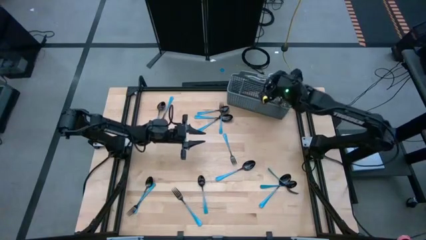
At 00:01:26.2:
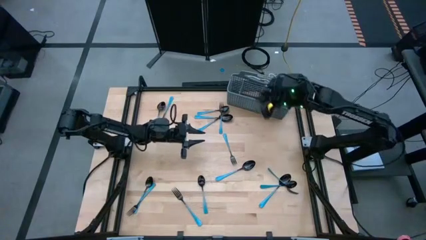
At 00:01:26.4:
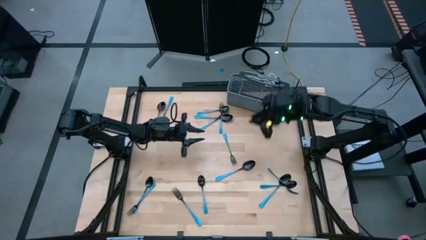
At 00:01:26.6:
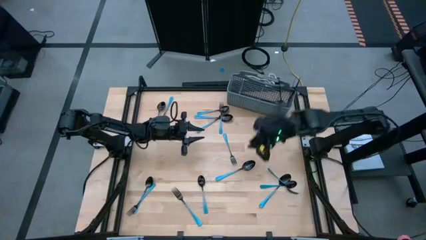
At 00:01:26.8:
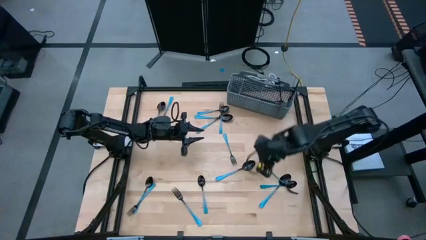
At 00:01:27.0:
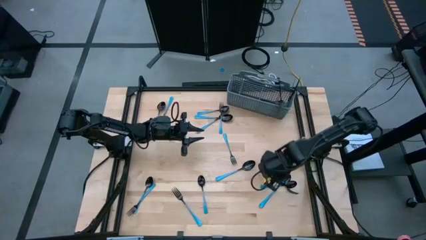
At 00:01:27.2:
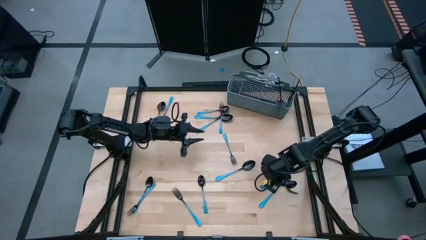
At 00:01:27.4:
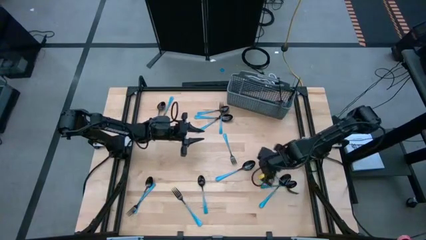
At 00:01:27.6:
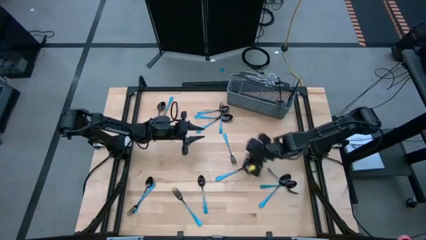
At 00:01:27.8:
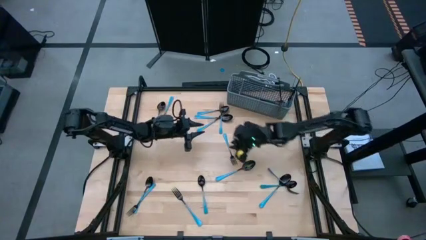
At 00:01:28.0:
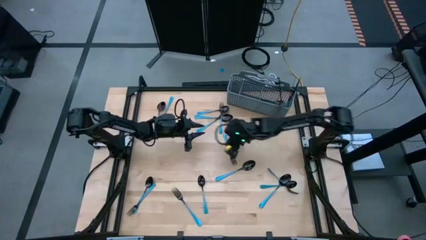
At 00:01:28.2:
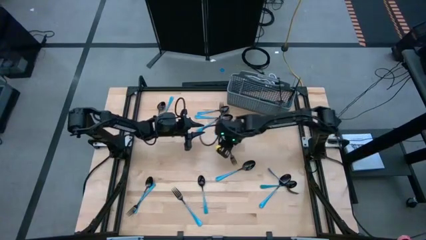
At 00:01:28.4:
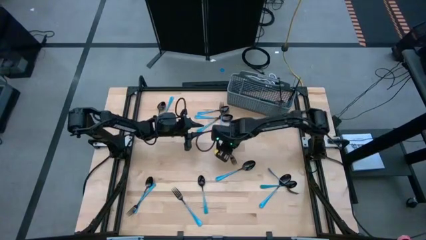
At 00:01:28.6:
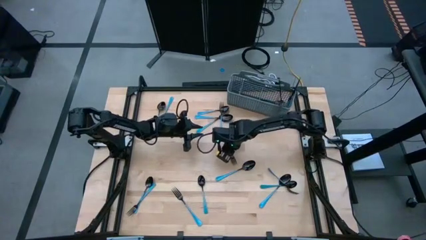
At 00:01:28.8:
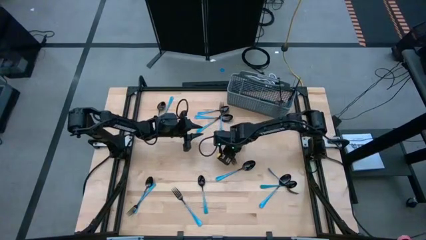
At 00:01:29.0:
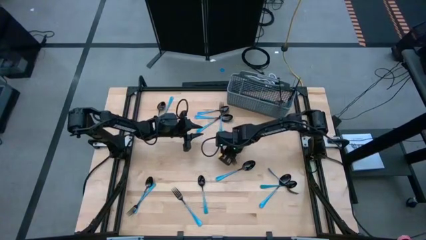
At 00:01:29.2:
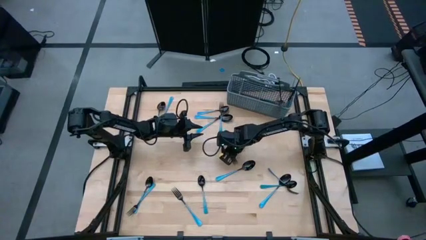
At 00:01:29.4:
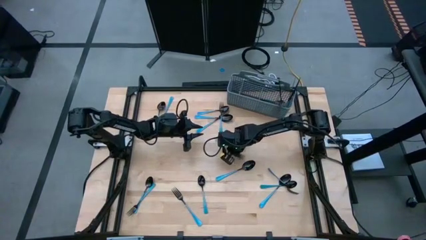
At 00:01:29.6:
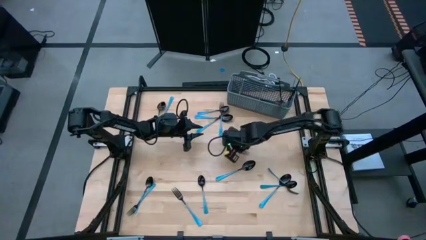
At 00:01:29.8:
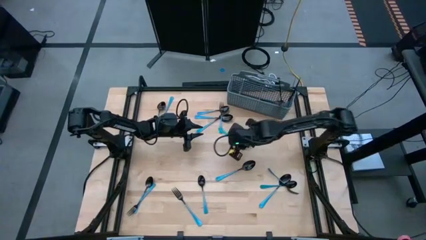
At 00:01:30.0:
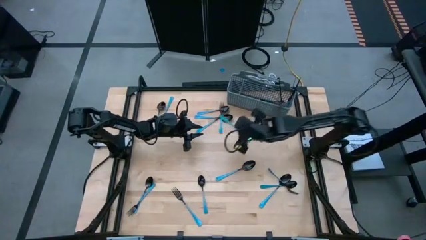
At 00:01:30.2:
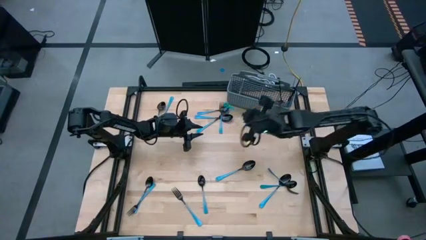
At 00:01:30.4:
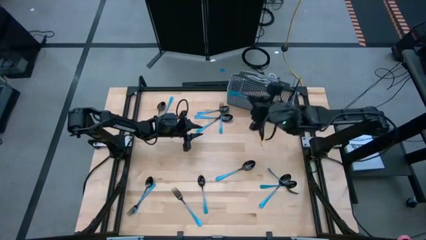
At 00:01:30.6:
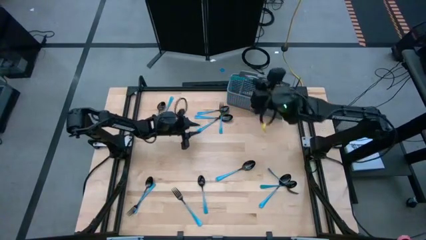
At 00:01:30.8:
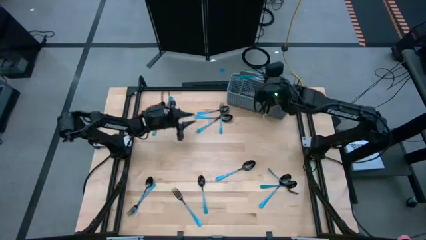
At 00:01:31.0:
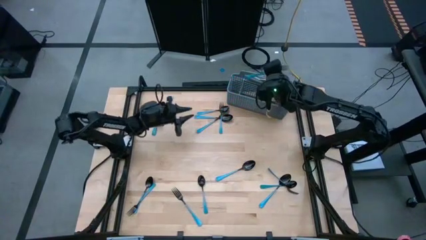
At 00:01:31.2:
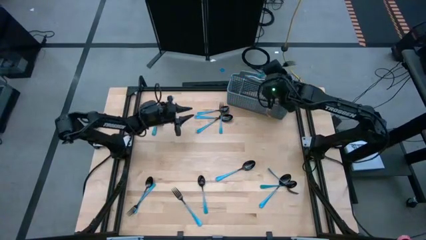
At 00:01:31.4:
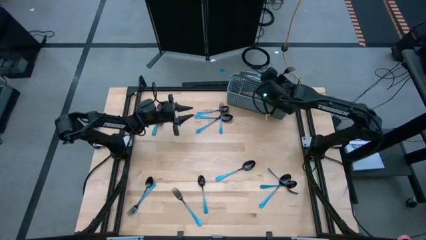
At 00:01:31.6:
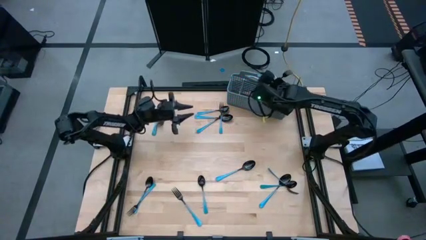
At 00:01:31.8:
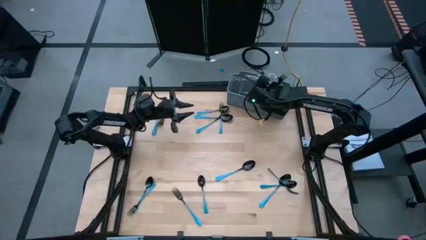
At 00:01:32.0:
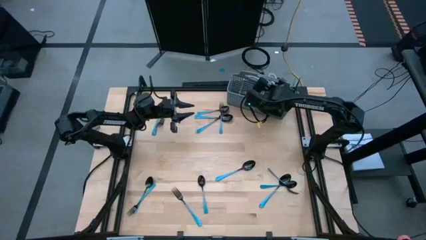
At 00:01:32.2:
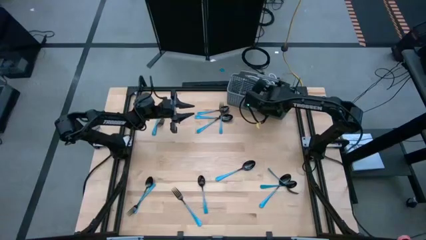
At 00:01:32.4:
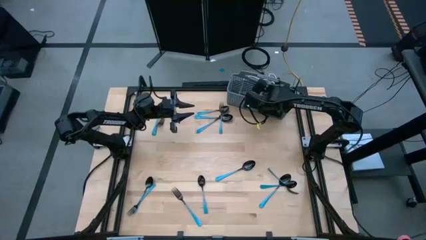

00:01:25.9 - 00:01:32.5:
Task: Sort silverware
Put the blue fork into the middle of the blue utensil organizer

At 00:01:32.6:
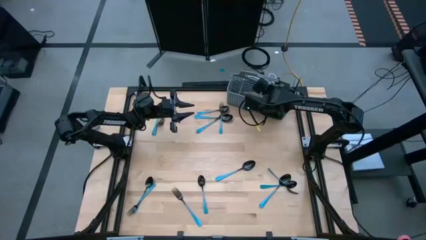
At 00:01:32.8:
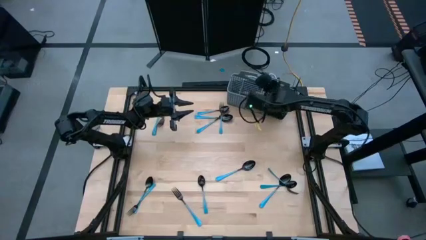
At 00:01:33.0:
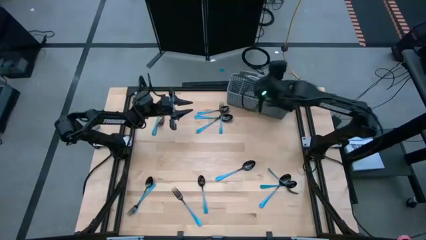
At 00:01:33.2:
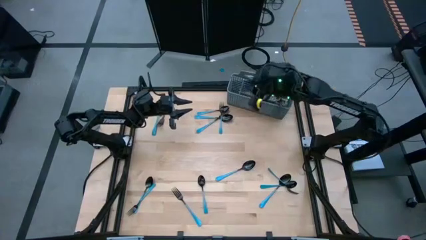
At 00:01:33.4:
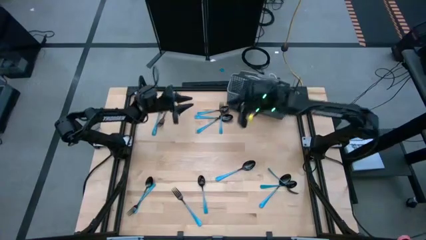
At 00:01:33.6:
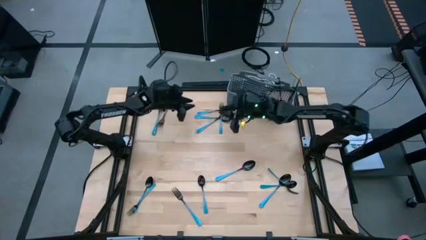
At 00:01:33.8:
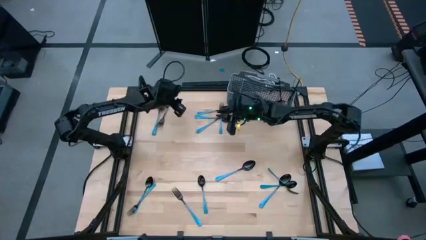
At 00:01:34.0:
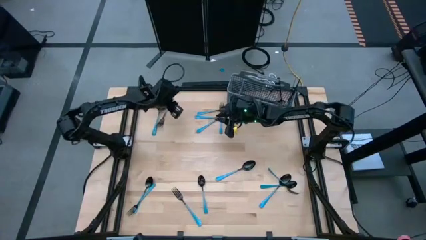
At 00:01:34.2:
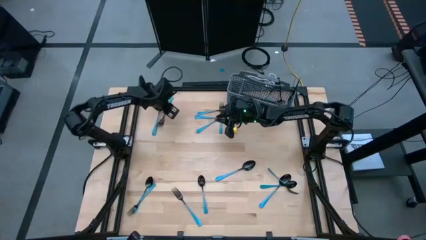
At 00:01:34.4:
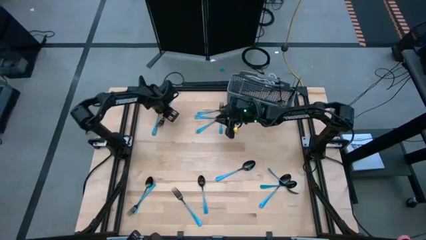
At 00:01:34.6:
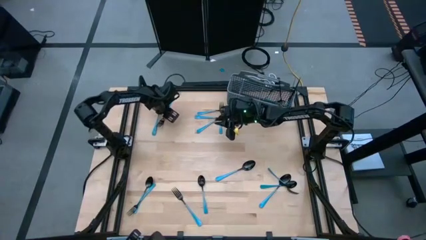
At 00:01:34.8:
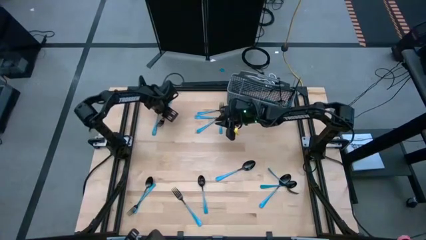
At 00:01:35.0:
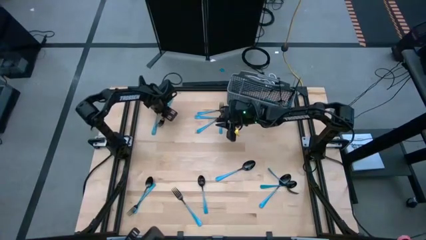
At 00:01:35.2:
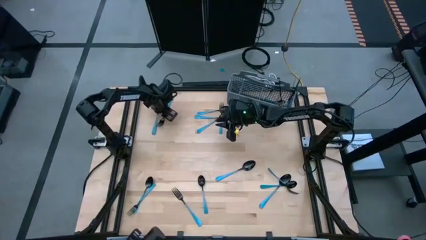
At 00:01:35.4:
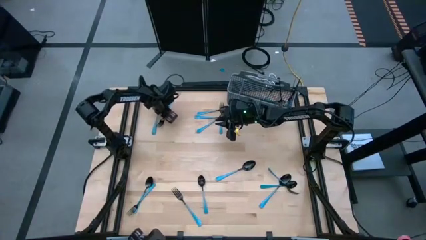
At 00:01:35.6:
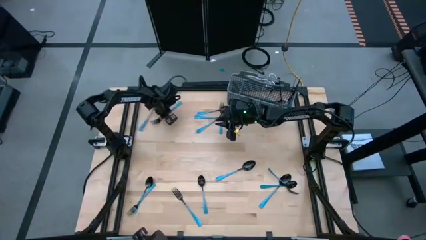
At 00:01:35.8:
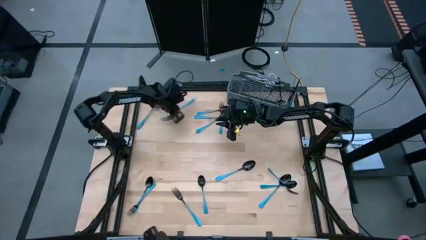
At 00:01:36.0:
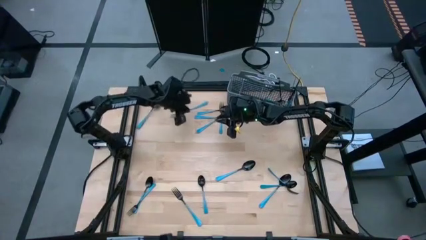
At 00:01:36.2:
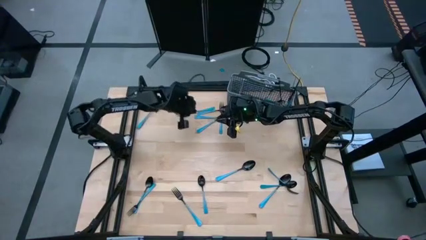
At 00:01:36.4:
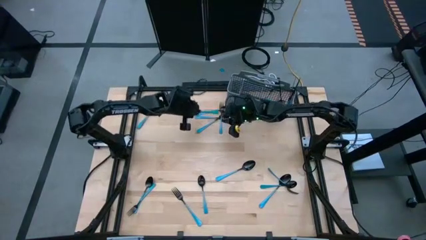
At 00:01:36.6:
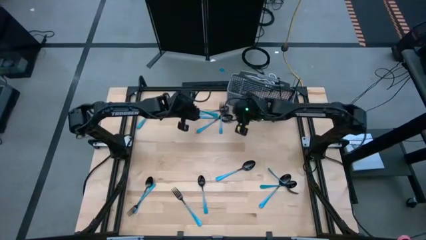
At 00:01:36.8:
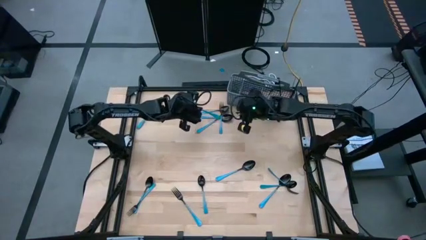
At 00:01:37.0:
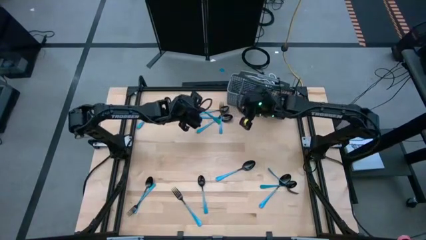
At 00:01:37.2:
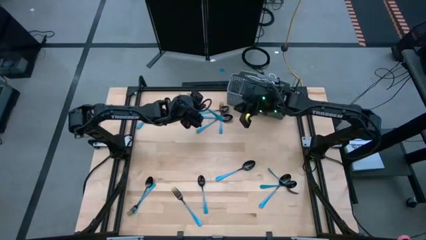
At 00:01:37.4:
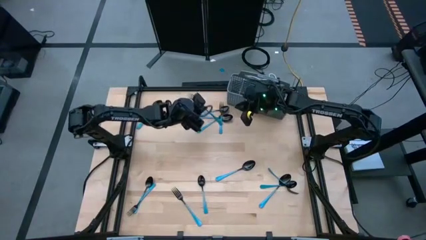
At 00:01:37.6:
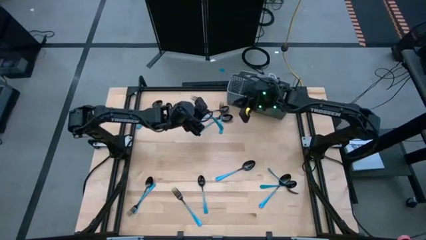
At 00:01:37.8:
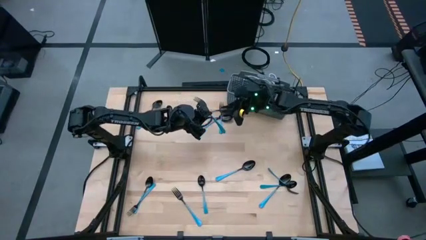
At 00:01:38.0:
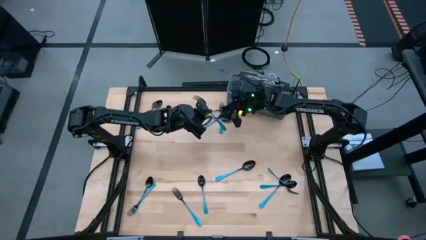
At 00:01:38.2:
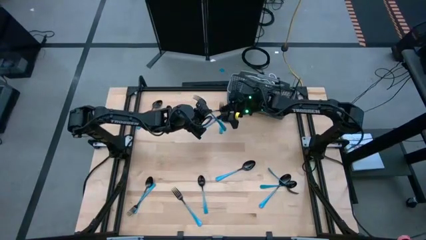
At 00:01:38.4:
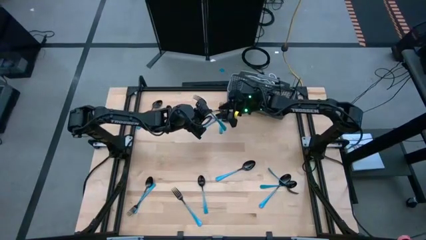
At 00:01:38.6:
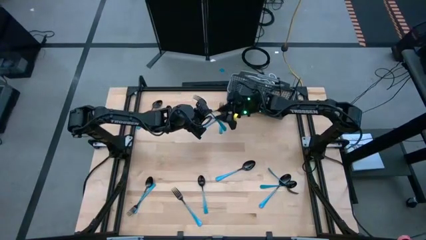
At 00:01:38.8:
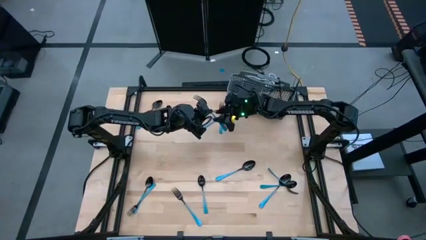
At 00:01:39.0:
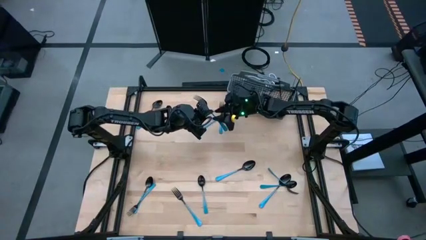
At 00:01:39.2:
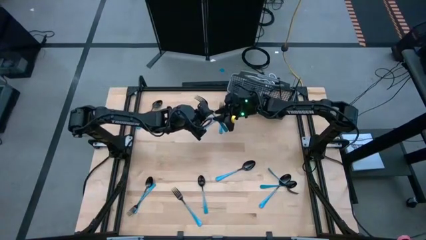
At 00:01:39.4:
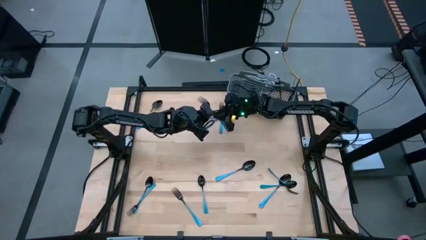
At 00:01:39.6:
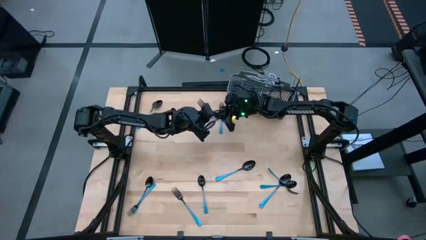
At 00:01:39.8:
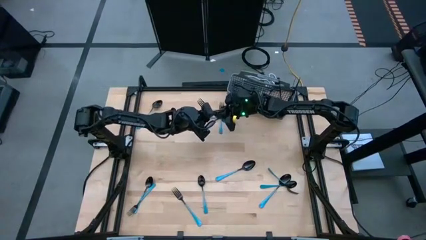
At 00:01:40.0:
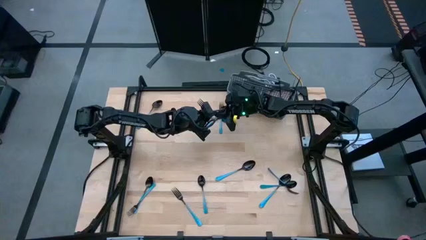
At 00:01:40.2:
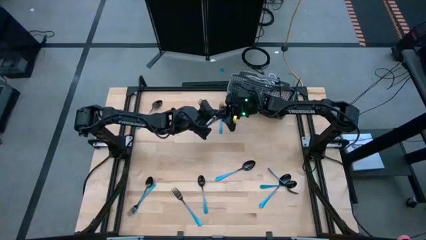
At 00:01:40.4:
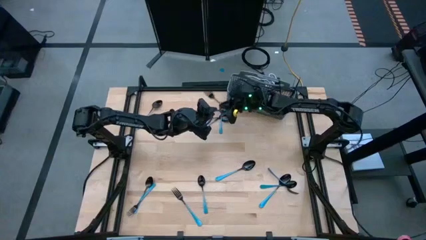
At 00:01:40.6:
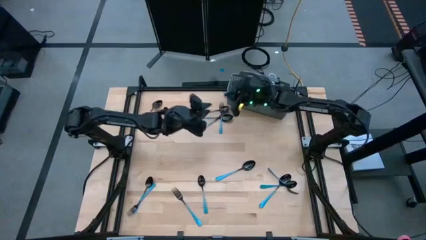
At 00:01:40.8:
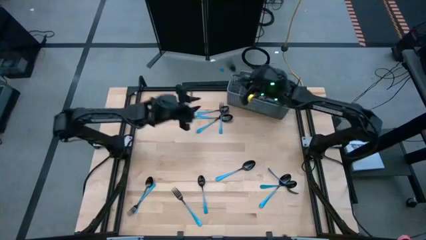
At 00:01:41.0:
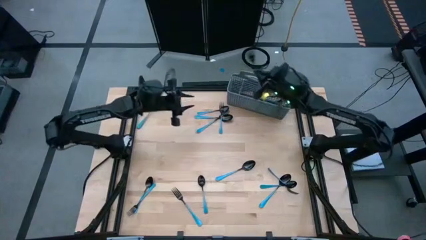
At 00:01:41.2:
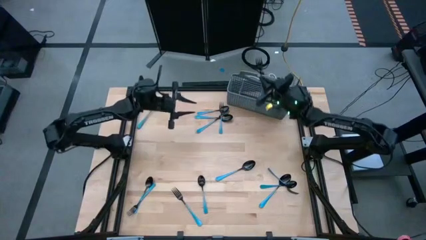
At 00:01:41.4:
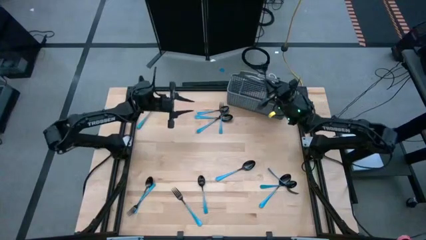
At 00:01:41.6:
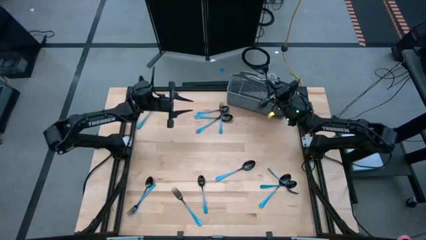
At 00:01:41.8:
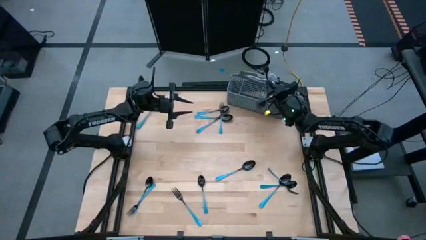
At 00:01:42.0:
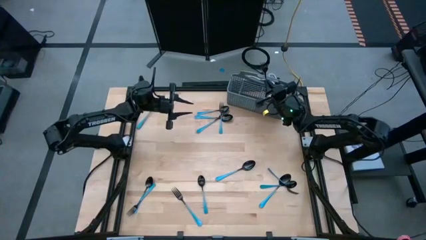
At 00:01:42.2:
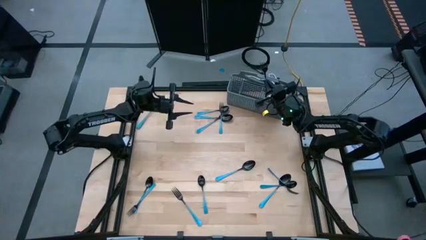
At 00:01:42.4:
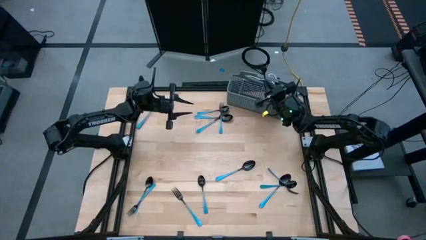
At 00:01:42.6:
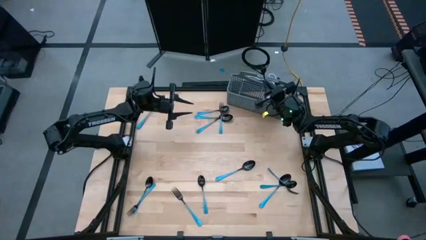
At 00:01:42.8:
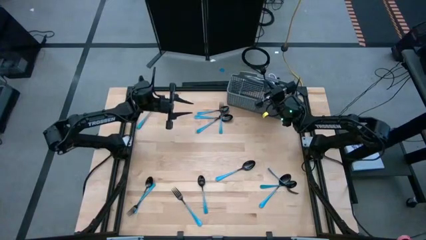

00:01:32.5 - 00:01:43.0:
Put the blue fork into the middle of the blue utensil organizer
